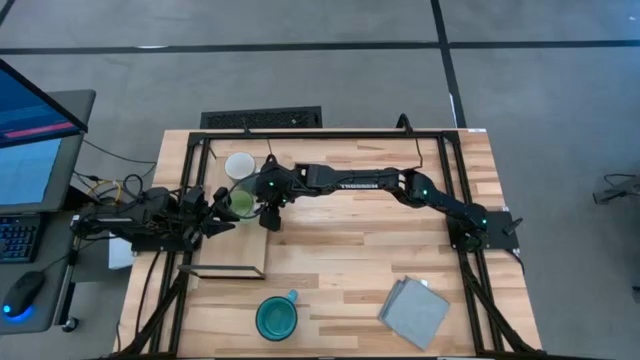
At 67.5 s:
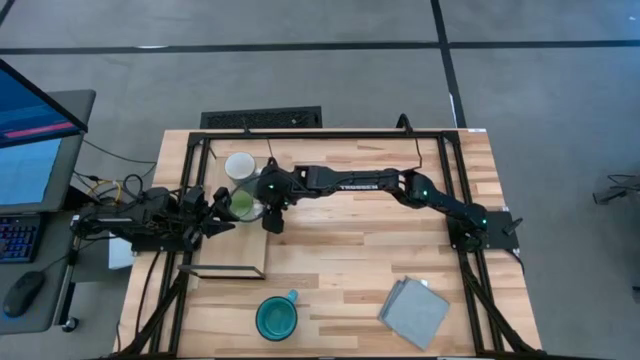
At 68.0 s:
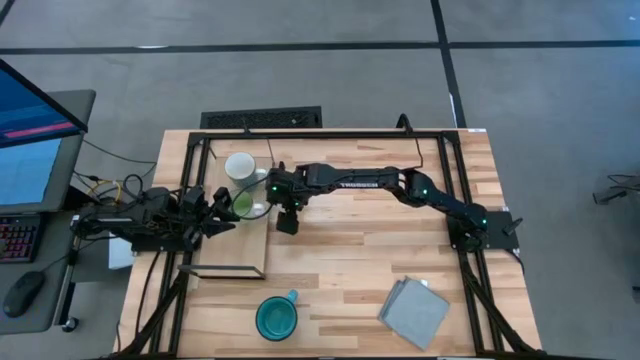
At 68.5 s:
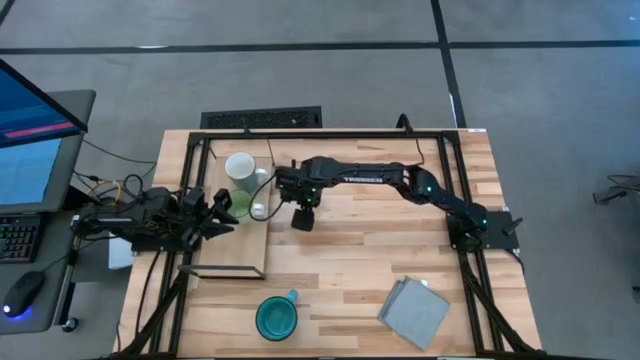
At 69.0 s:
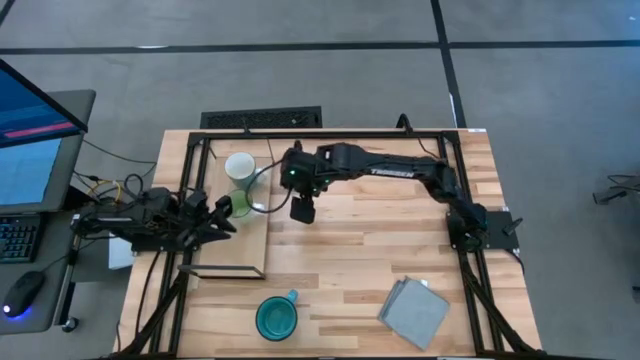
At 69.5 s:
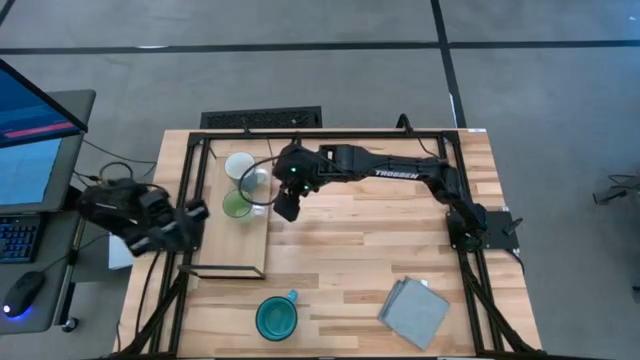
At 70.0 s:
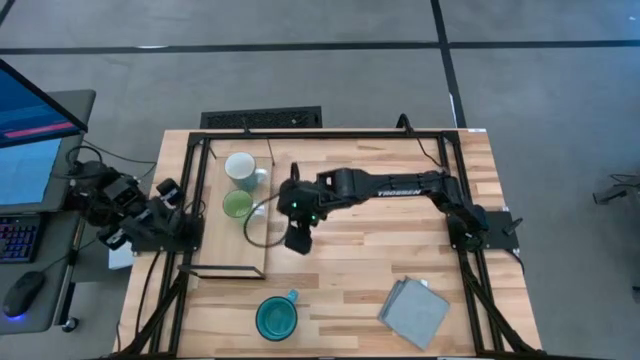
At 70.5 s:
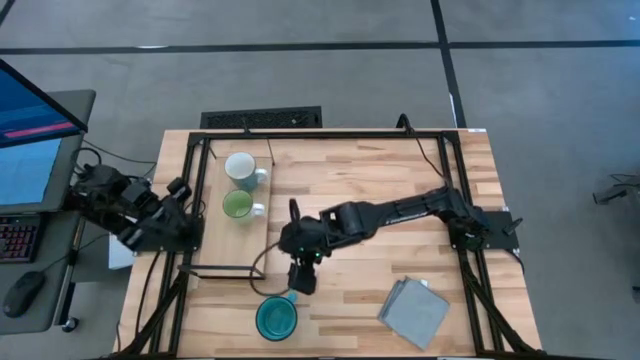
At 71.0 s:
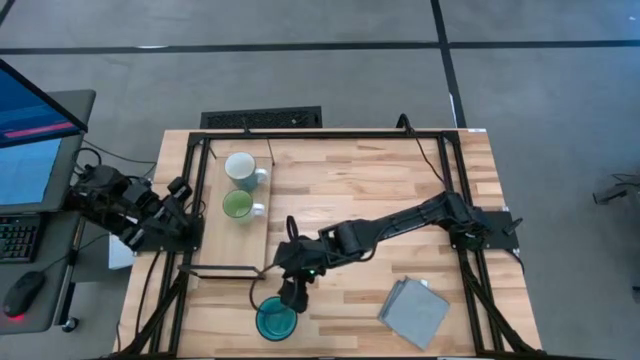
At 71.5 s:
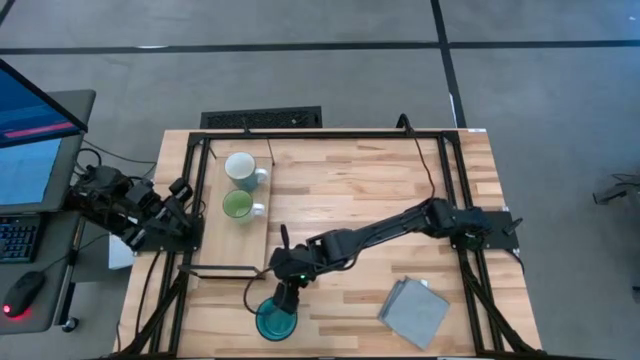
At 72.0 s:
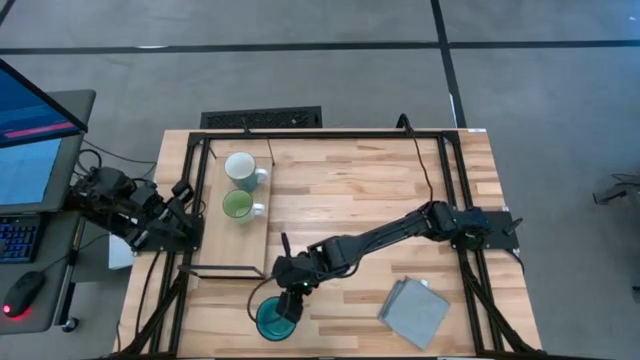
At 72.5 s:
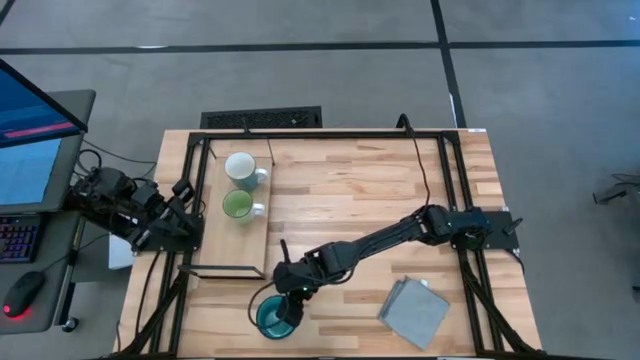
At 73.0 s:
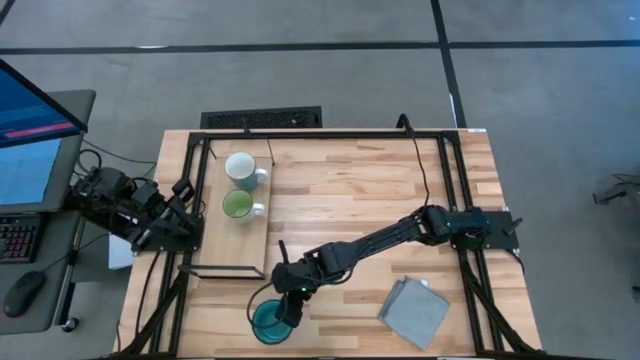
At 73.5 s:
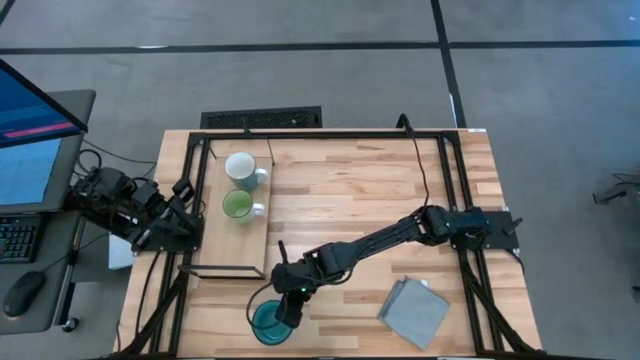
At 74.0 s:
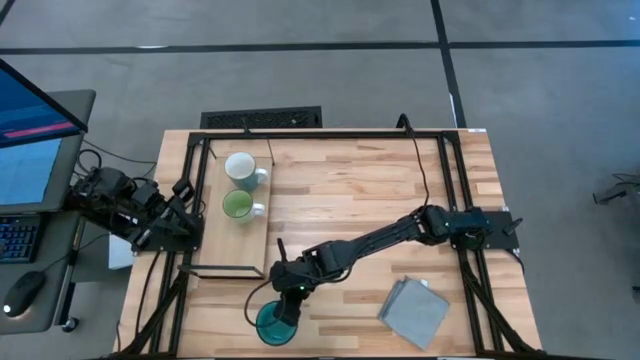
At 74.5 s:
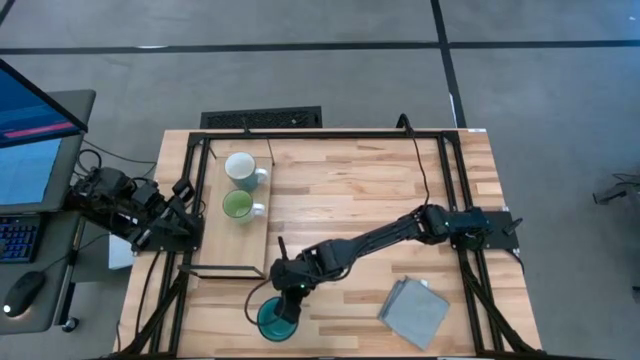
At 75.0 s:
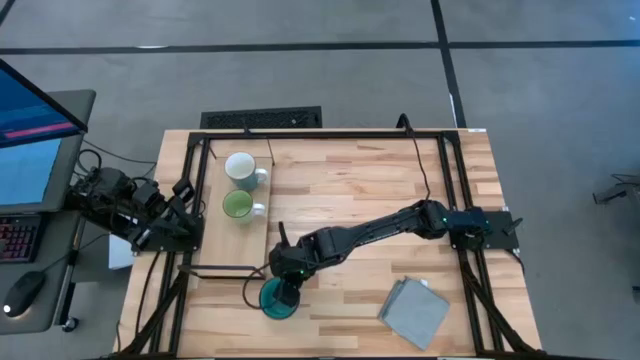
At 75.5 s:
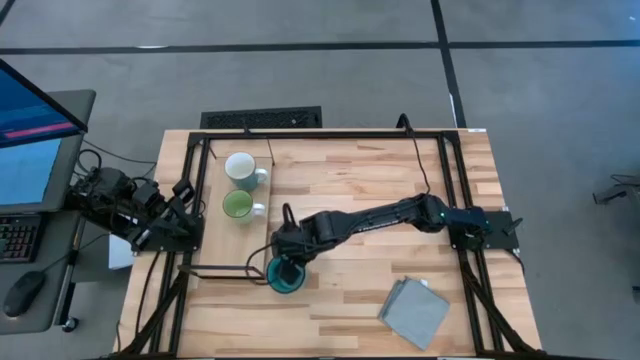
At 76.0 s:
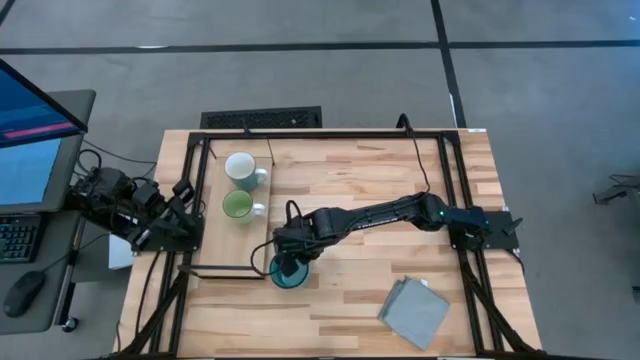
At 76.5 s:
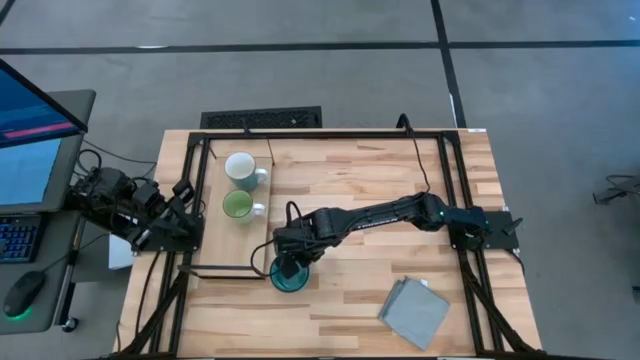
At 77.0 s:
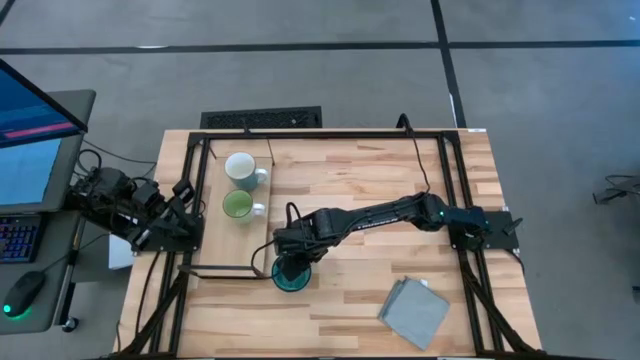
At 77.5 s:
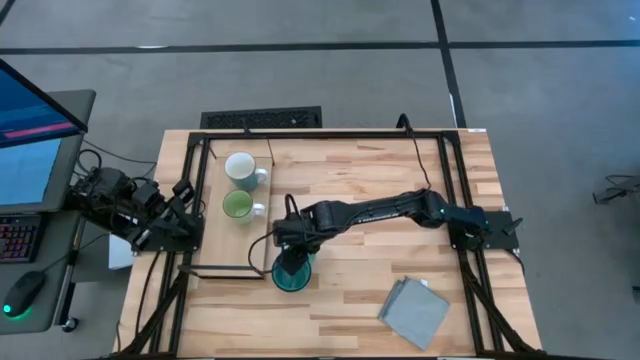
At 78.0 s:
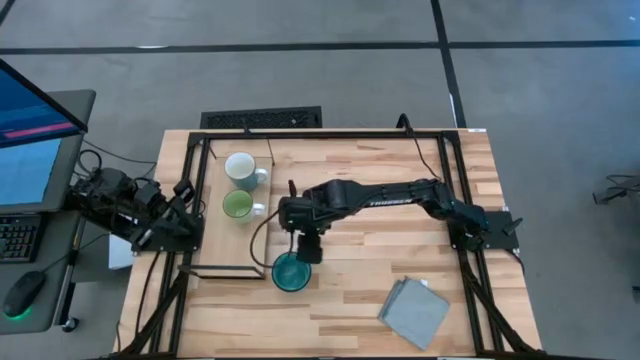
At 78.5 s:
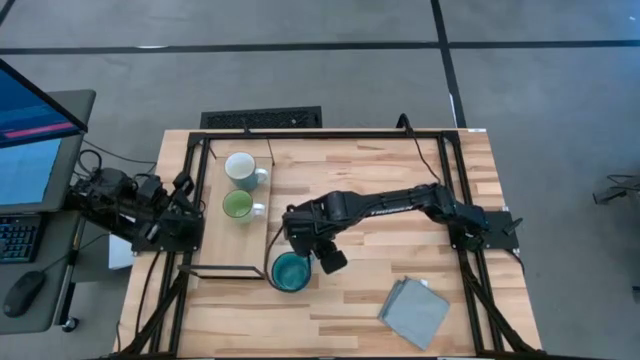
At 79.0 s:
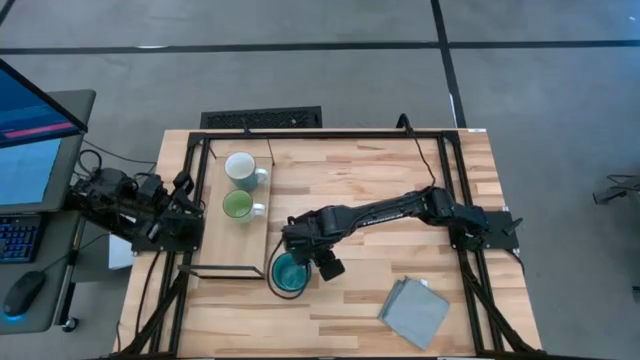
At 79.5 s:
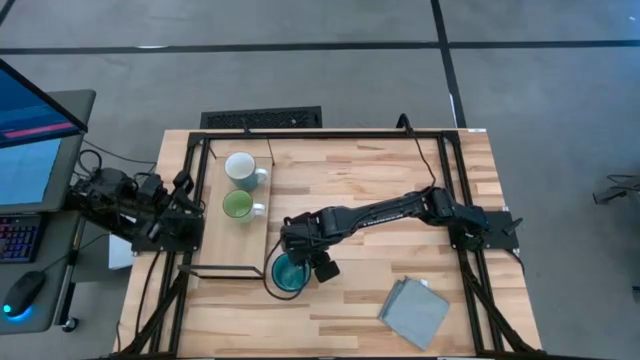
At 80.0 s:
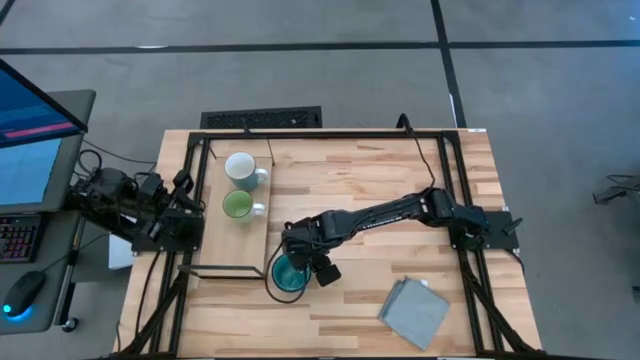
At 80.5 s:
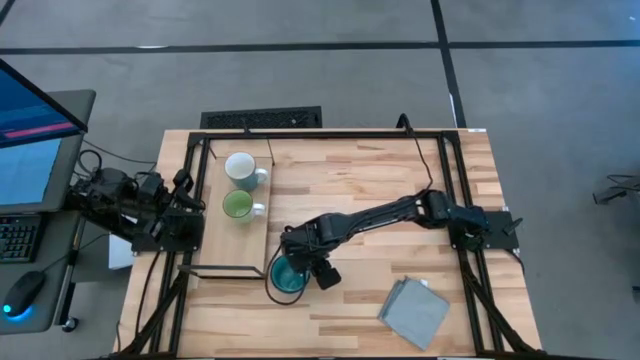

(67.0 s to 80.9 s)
Task: Stack small to large cups/mugs on shelf
Put the blue mug on the shelf
